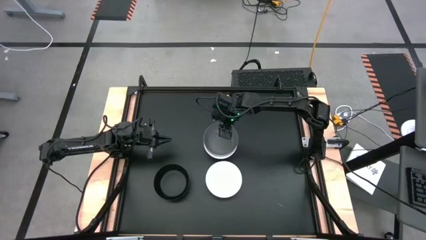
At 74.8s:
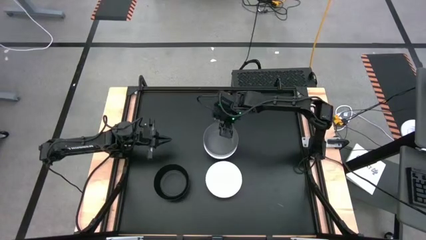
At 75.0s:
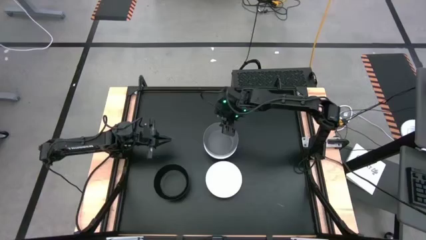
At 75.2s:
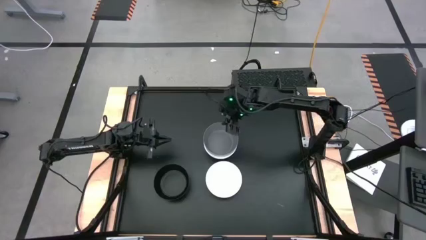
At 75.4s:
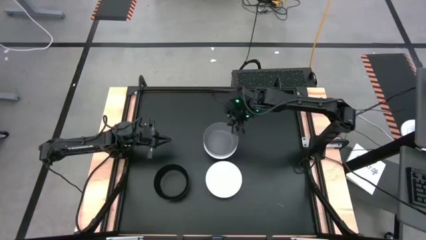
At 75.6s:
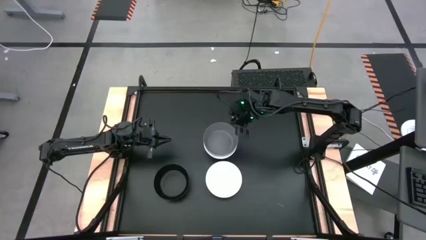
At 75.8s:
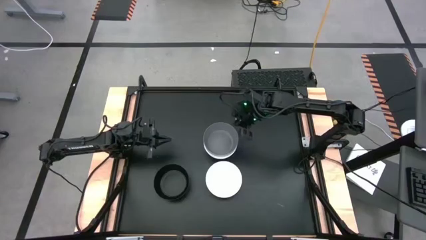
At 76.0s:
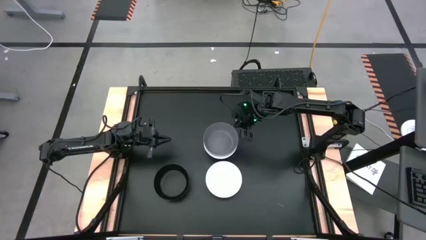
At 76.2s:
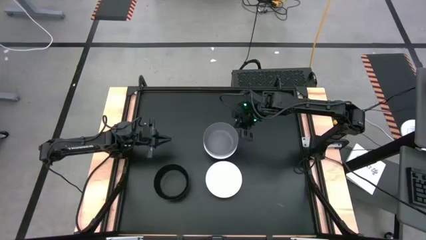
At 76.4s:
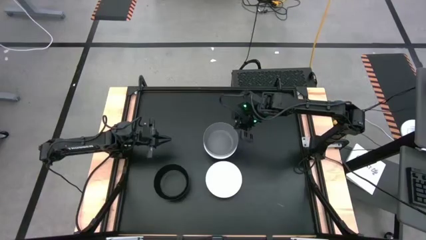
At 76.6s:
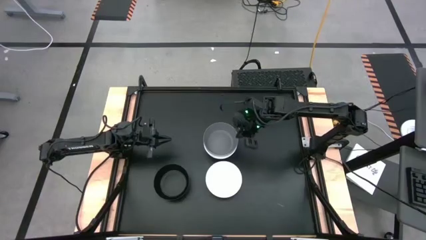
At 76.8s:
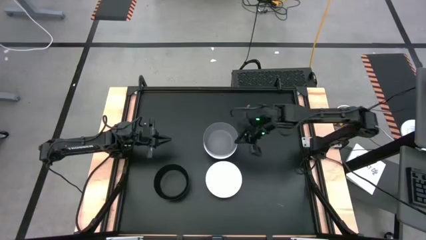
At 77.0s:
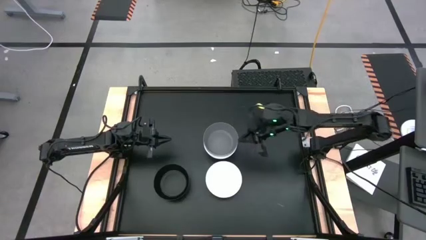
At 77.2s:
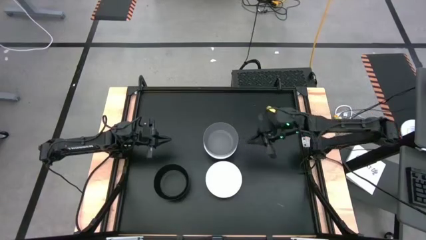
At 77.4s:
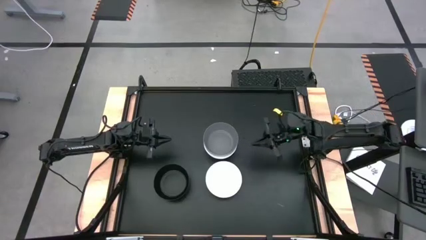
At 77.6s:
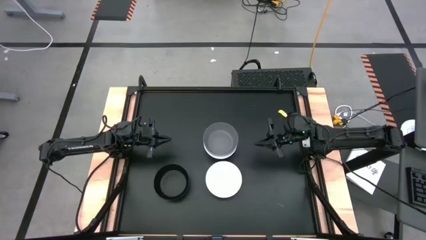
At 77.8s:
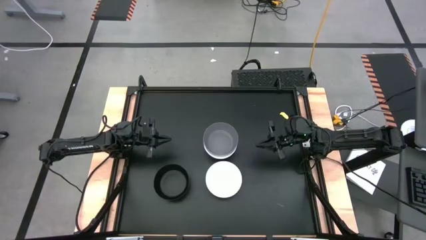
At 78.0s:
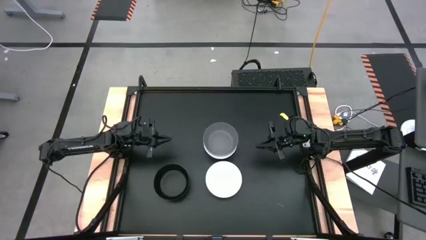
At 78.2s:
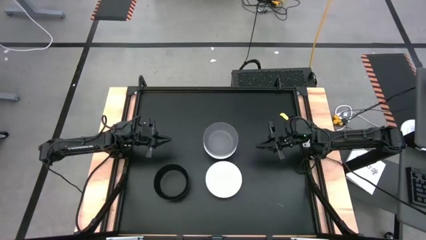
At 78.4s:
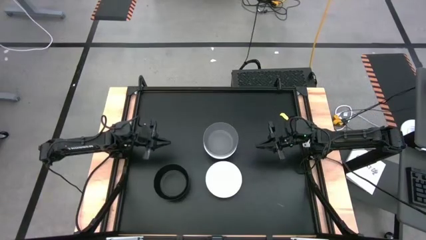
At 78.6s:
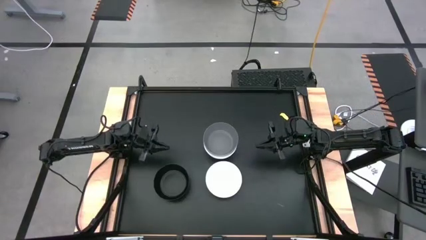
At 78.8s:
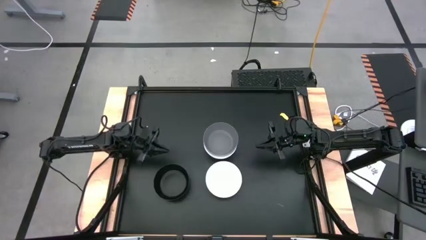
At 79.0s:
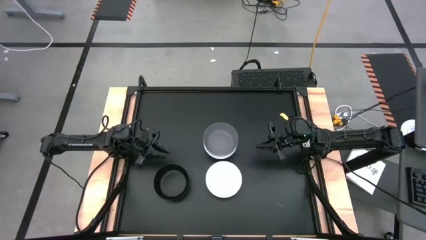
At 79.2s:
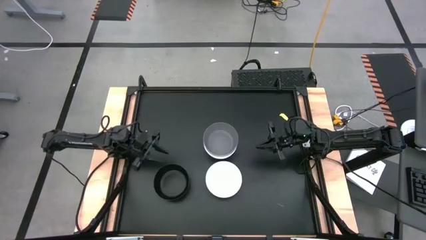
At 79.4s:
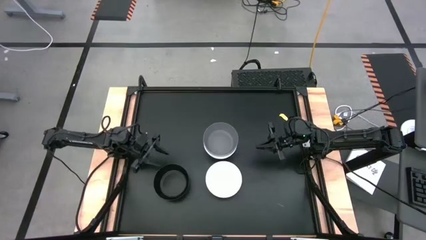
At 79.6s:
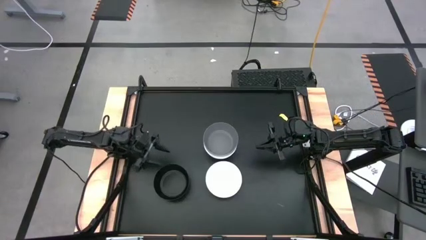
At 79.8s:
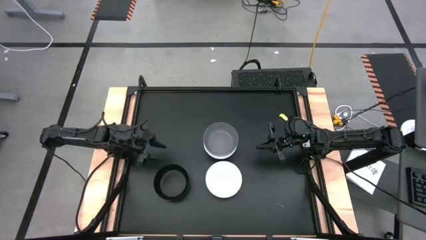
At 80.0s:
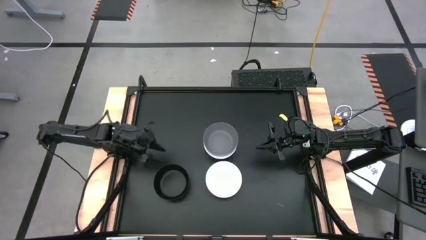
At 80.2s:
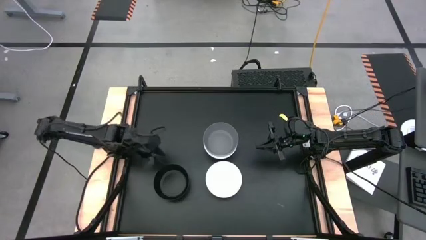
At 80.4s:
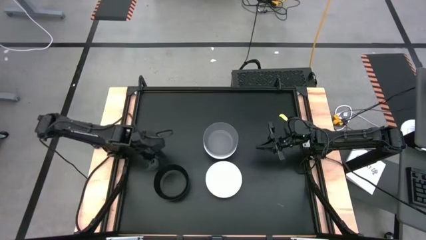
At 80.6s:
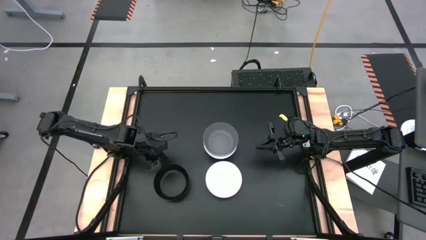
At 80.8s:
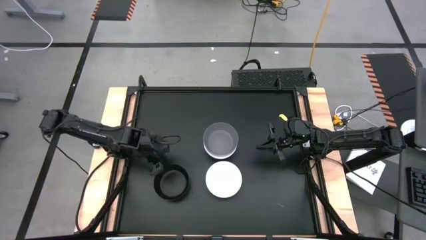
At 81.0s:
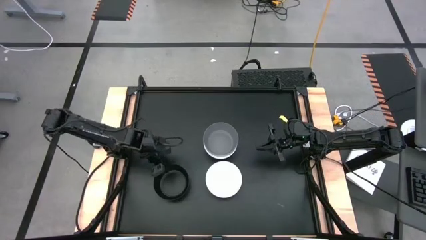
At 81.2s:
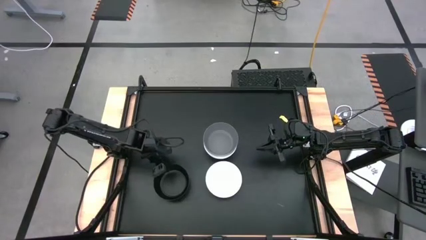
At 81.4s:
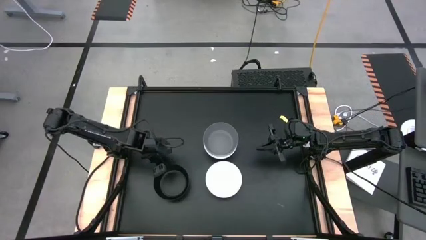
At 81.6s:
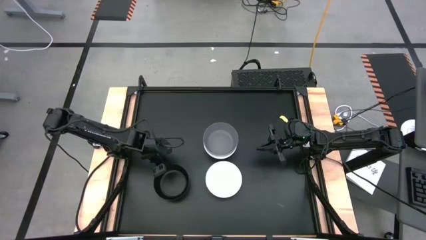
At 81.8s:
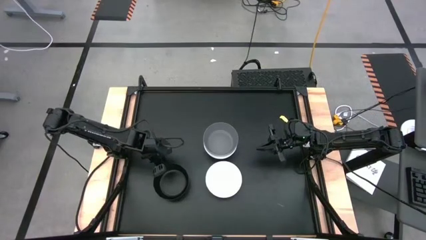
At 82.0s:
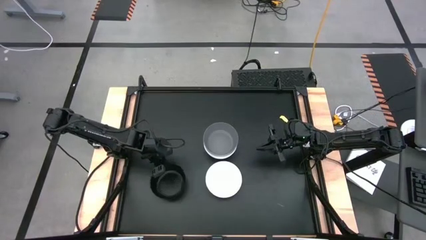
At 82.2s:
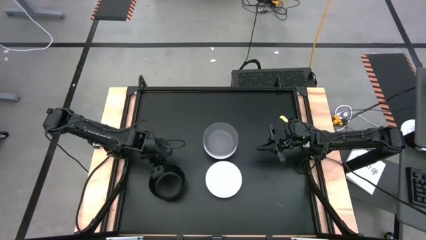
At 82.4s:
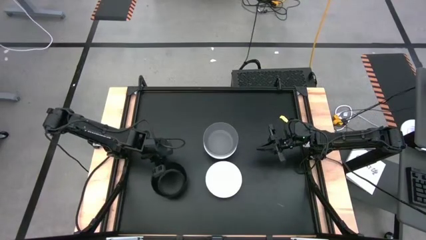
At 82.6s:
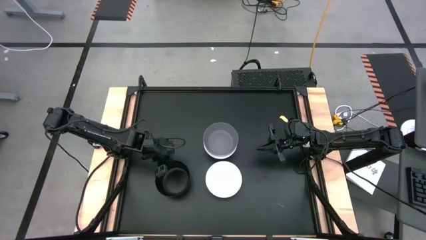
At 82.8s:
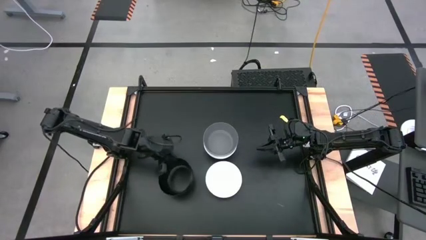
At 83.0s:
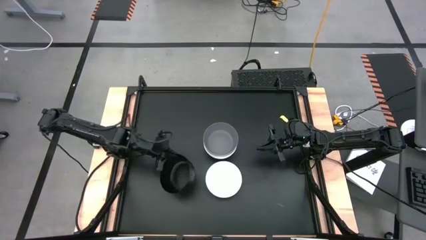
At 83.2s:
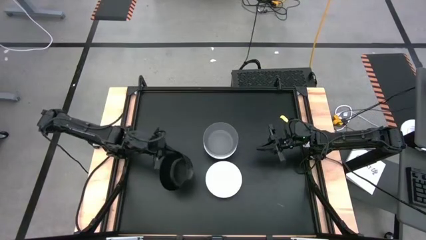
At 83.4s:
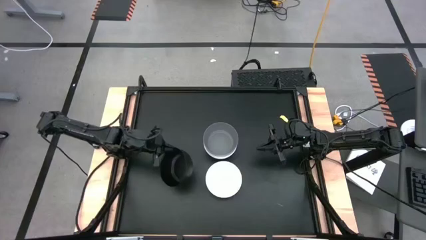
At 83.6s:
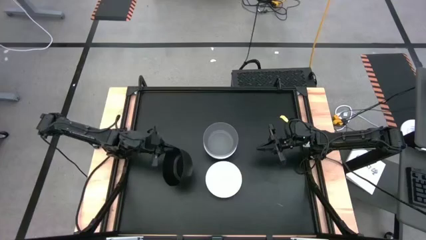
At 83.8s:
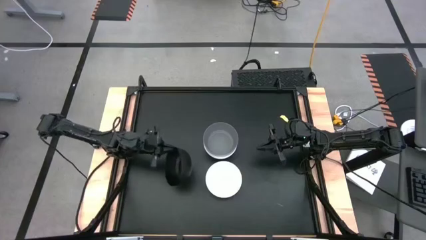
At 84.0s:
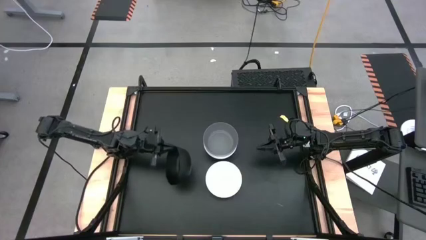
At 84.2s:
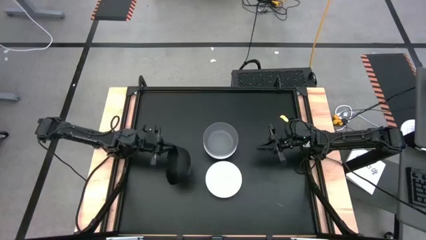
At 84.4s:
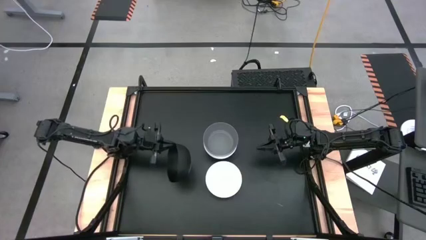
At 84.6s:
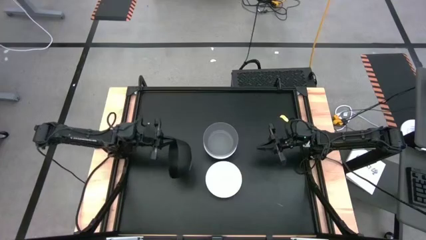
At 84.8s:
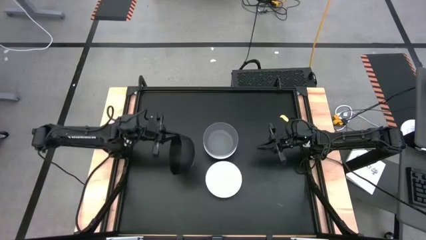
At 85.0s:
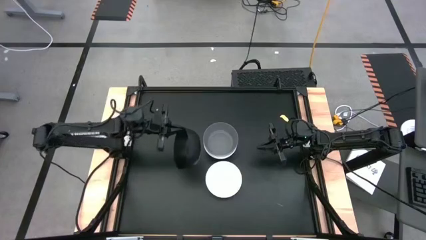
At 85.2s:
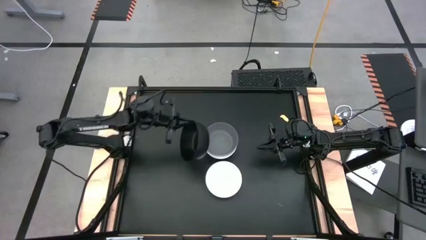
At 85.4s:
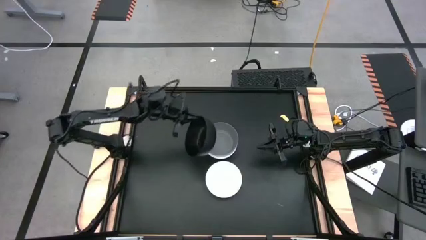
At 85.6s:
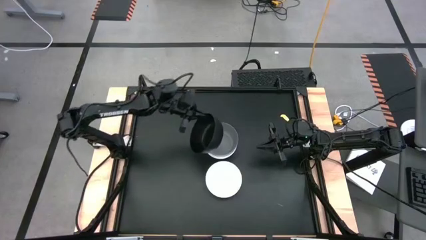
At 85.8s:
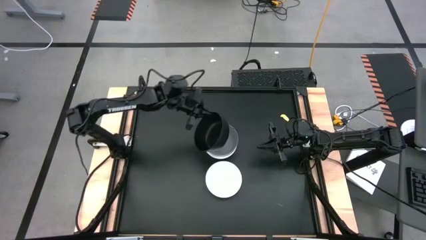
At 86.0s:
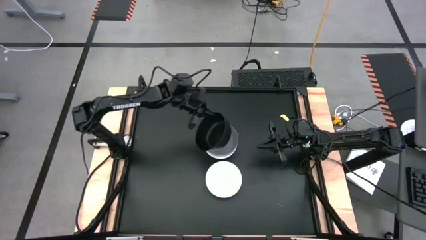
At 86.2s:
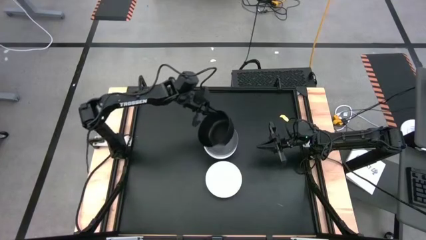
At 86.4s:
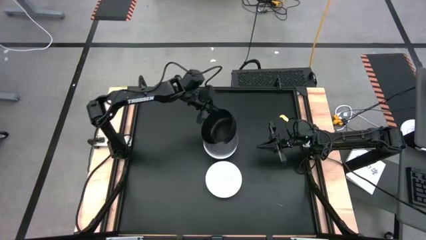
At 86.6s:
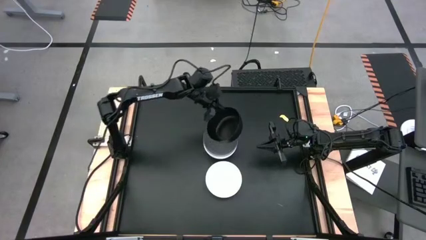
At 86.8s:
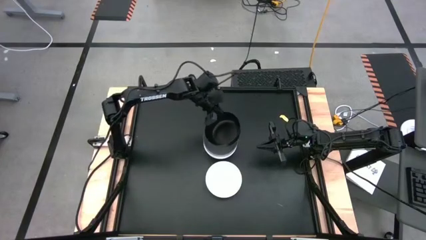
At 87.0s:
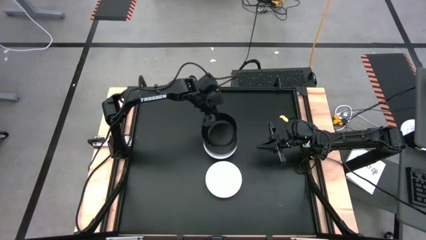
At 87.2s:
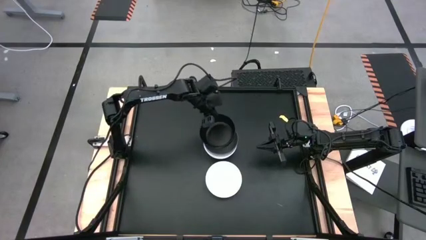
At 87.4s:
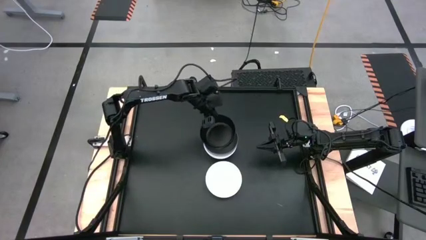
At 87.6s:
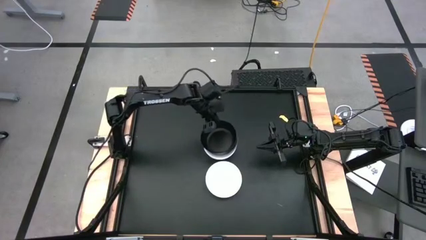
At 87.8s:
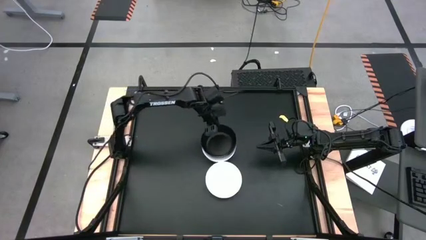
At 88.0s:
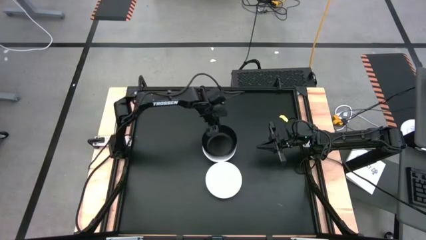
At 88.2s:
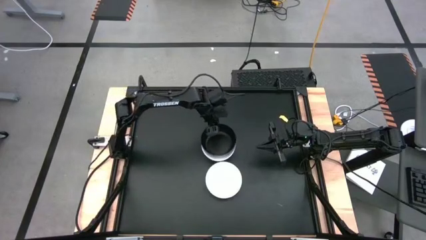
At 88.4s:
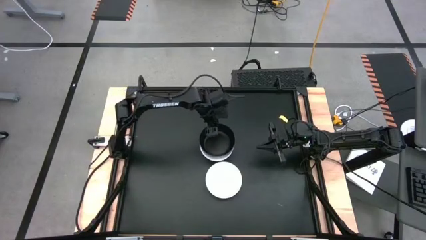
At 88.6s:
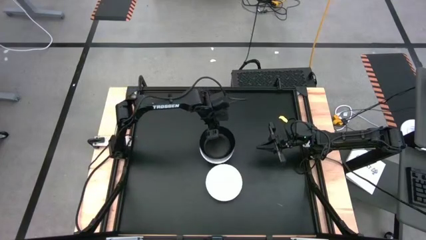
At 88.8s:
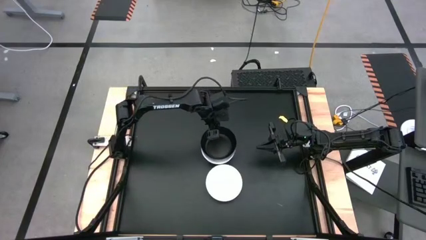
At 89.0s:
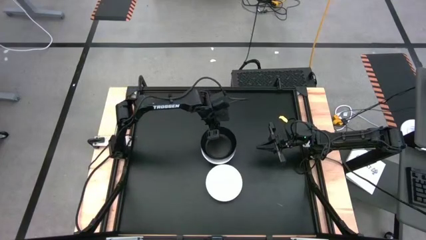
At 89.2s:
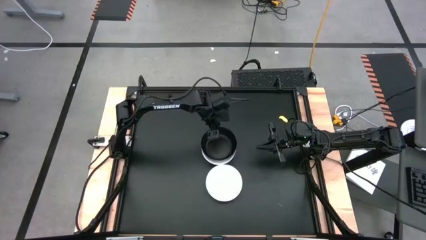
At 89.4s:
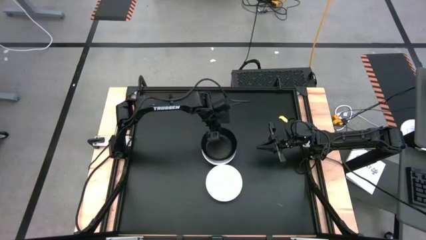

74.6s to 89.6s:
Task: Nest bowls inside each other
Stack the black bowl on top of the dark grey bowl
